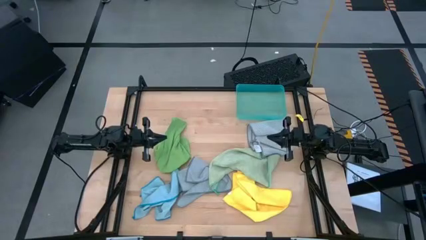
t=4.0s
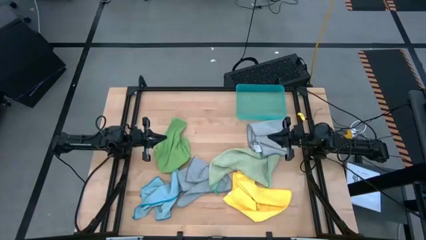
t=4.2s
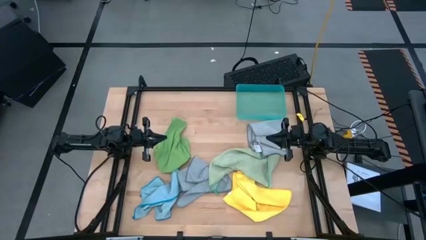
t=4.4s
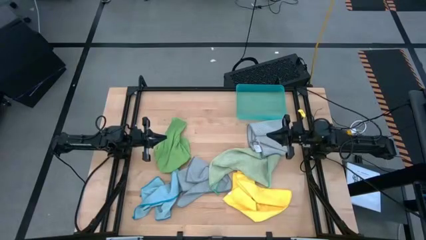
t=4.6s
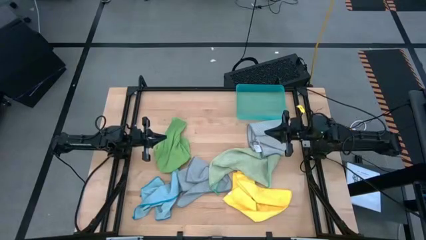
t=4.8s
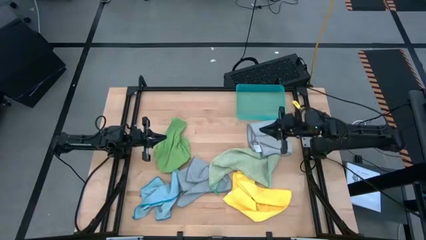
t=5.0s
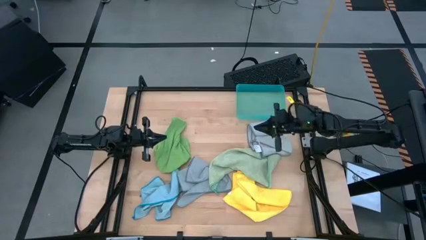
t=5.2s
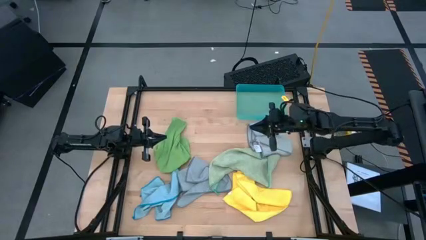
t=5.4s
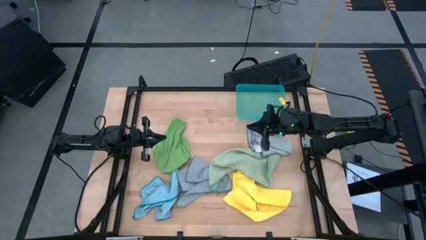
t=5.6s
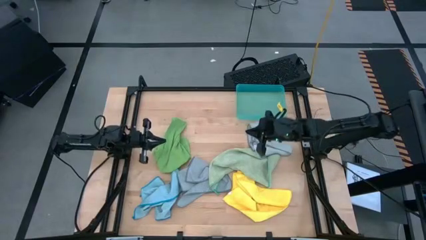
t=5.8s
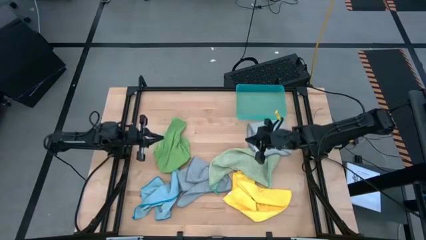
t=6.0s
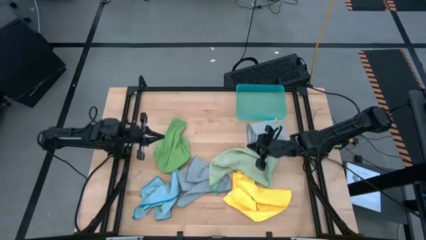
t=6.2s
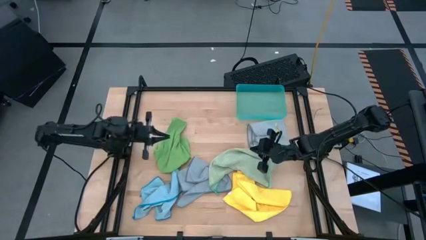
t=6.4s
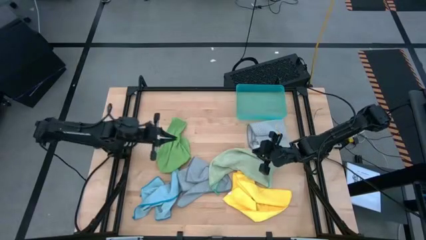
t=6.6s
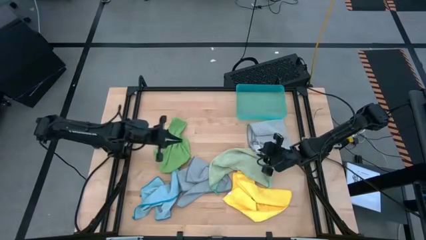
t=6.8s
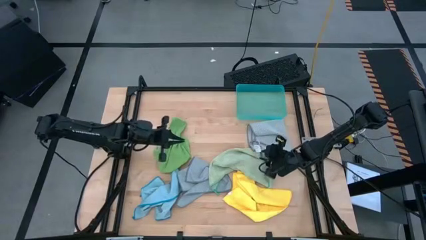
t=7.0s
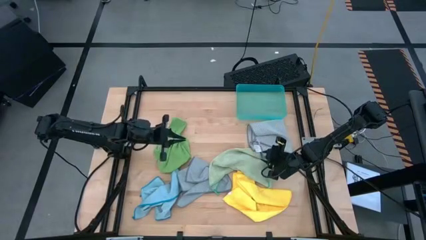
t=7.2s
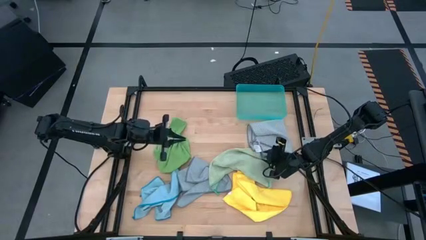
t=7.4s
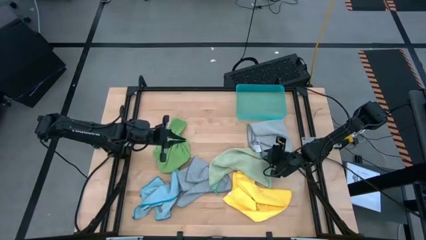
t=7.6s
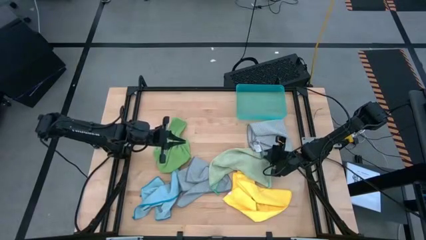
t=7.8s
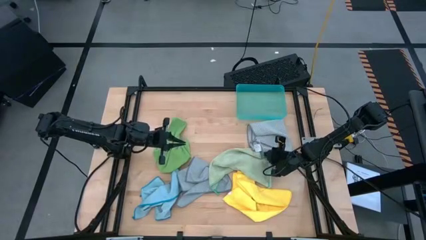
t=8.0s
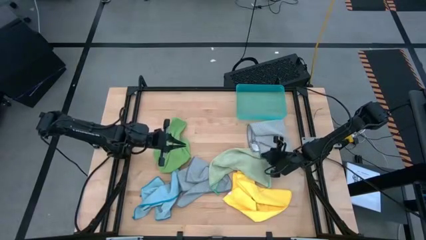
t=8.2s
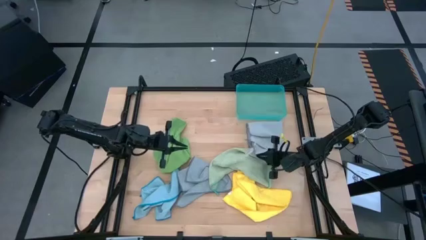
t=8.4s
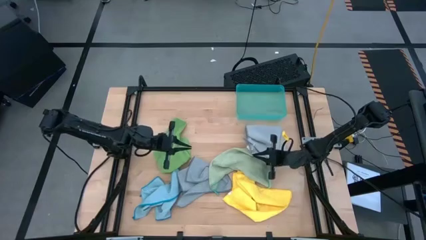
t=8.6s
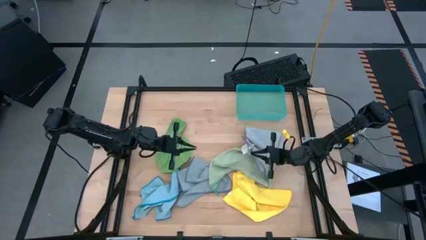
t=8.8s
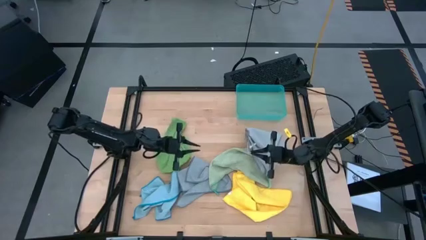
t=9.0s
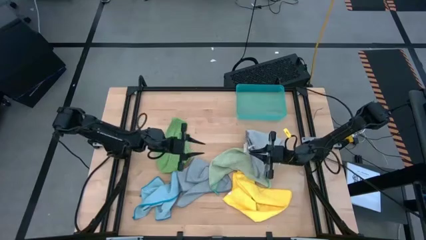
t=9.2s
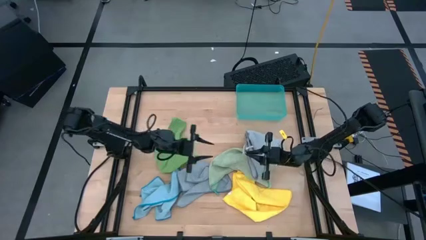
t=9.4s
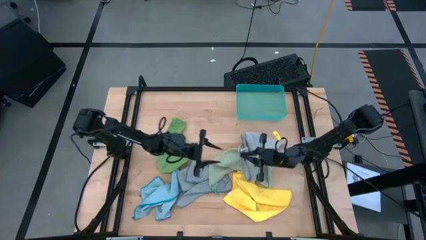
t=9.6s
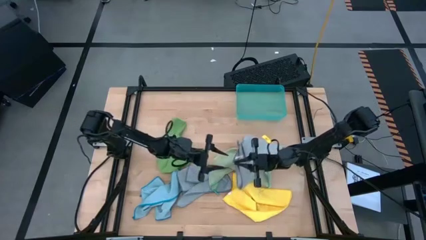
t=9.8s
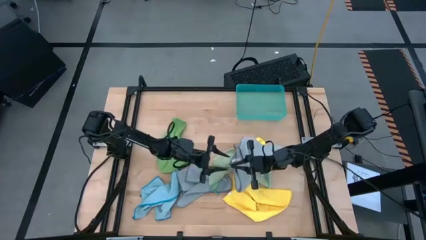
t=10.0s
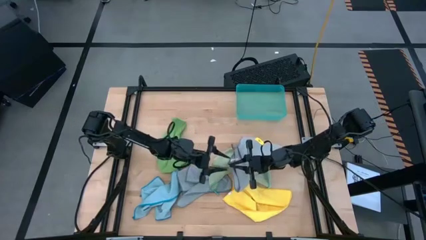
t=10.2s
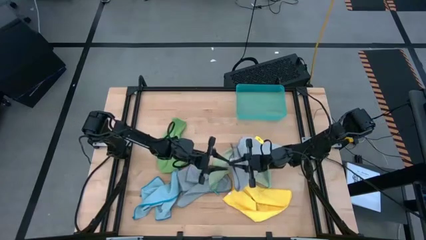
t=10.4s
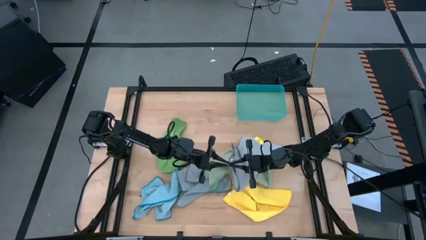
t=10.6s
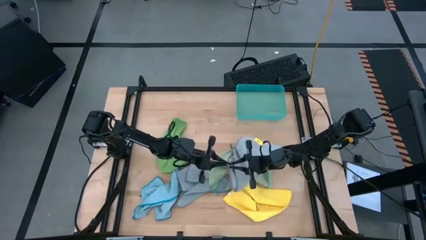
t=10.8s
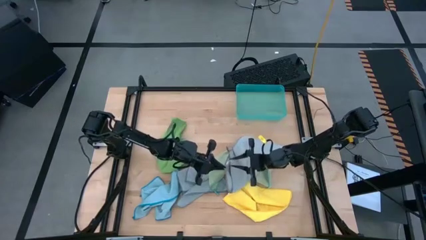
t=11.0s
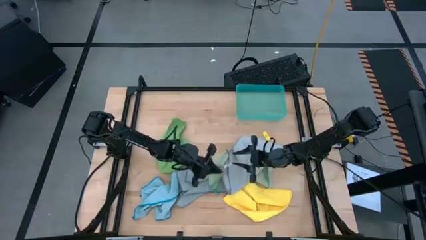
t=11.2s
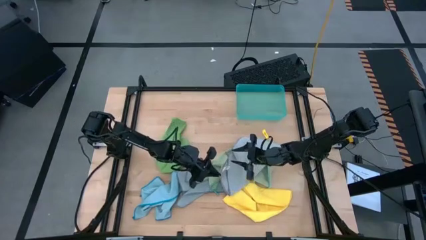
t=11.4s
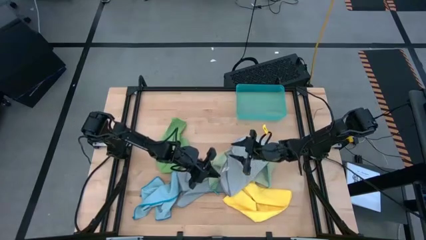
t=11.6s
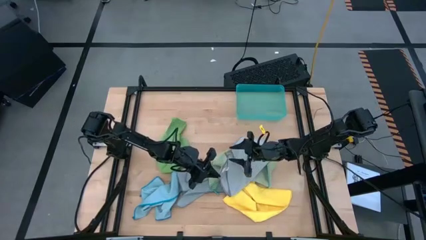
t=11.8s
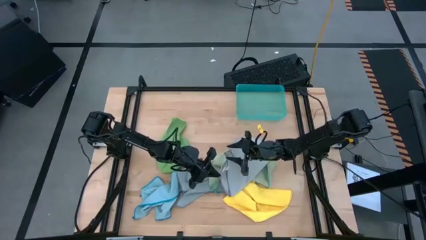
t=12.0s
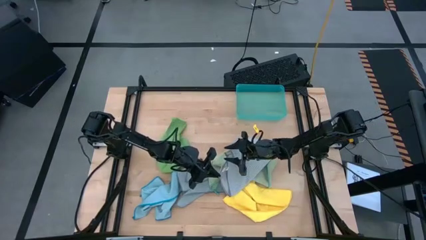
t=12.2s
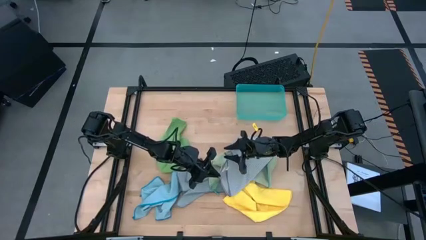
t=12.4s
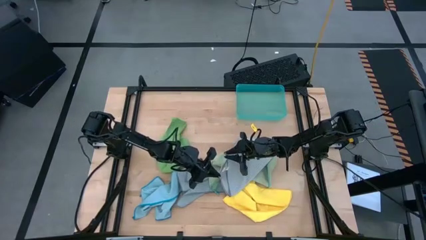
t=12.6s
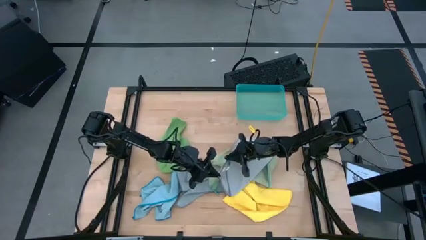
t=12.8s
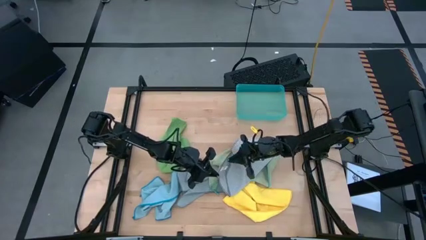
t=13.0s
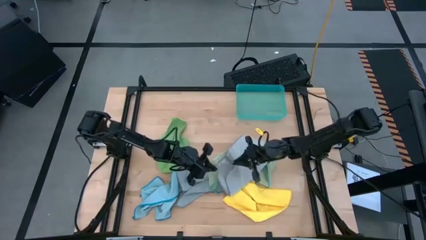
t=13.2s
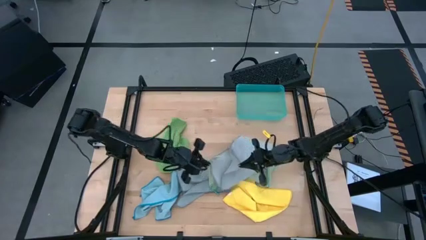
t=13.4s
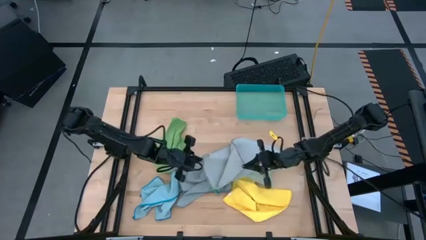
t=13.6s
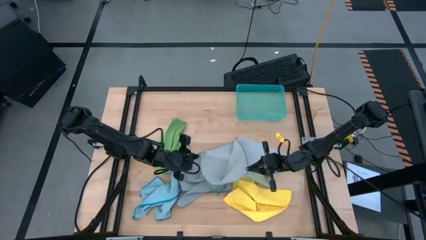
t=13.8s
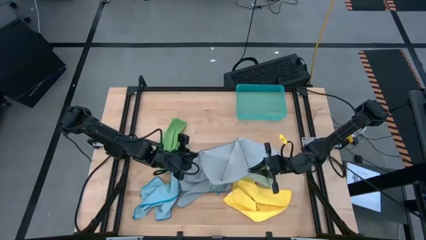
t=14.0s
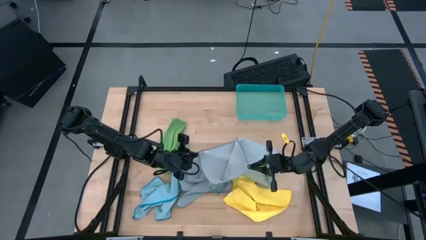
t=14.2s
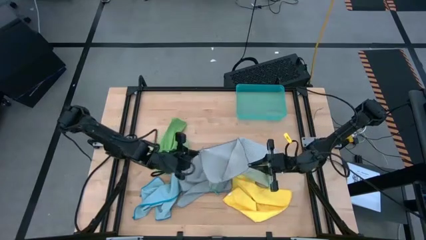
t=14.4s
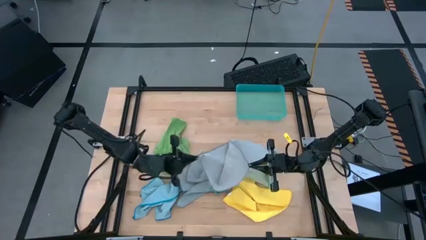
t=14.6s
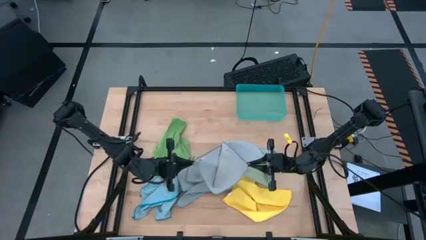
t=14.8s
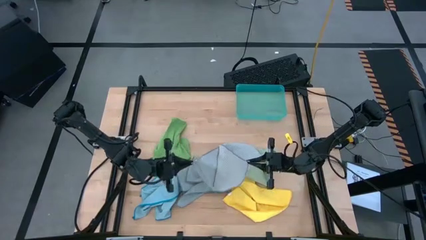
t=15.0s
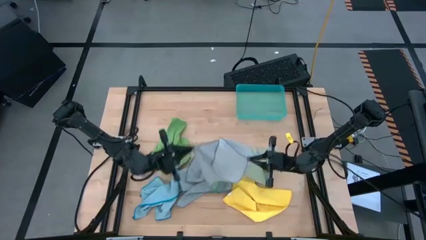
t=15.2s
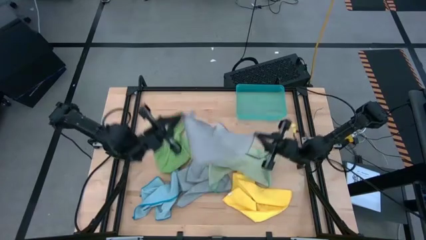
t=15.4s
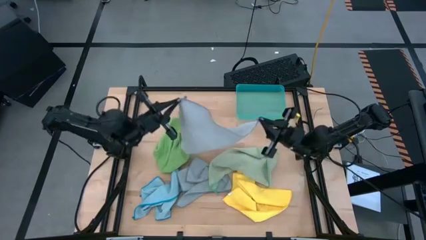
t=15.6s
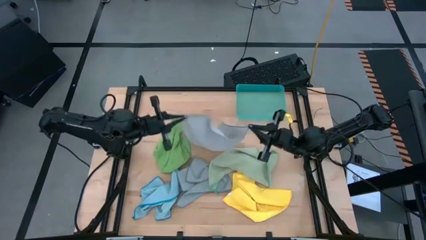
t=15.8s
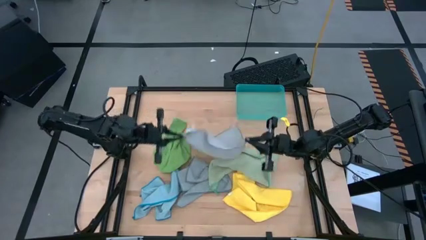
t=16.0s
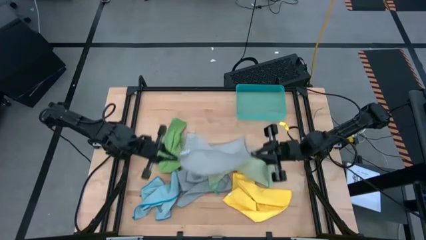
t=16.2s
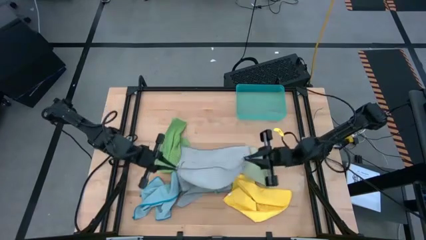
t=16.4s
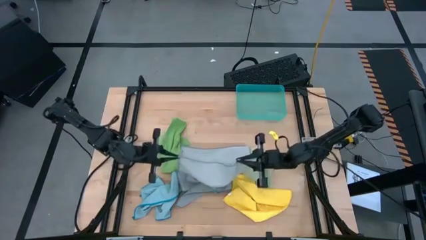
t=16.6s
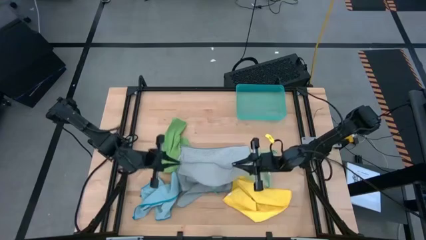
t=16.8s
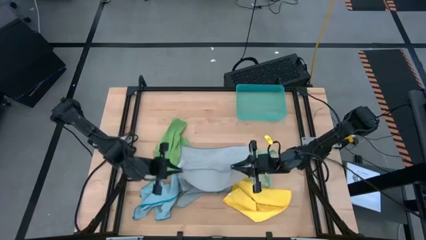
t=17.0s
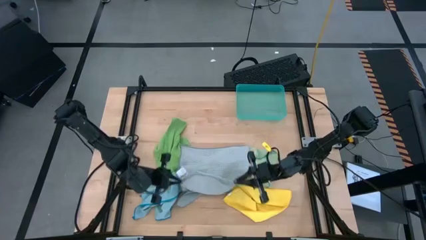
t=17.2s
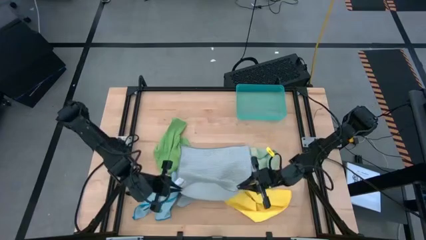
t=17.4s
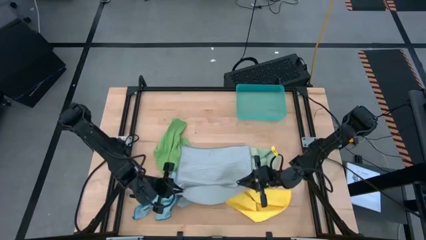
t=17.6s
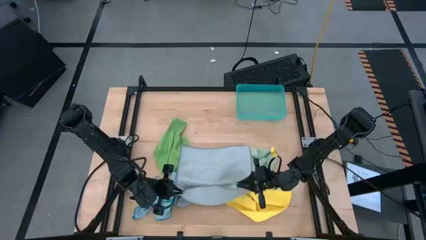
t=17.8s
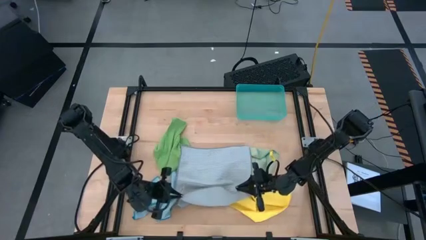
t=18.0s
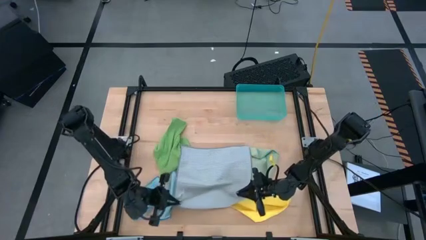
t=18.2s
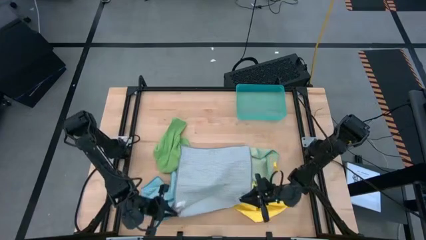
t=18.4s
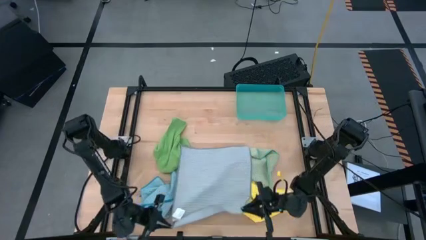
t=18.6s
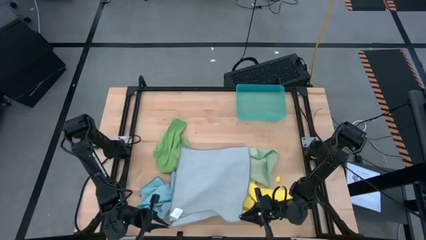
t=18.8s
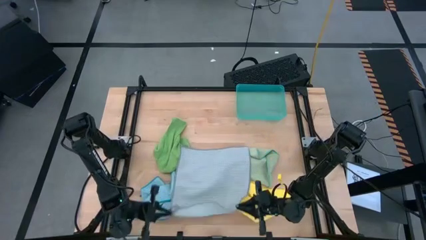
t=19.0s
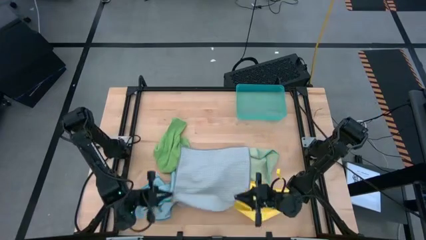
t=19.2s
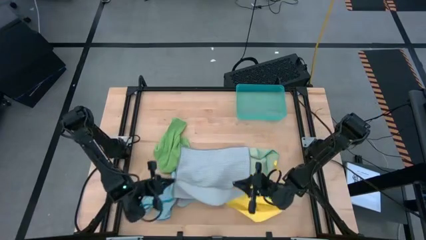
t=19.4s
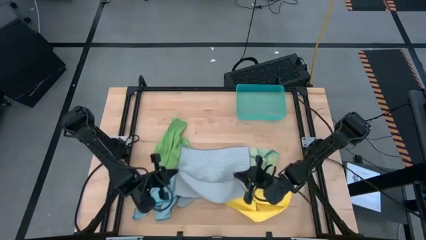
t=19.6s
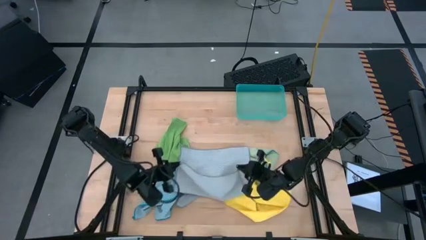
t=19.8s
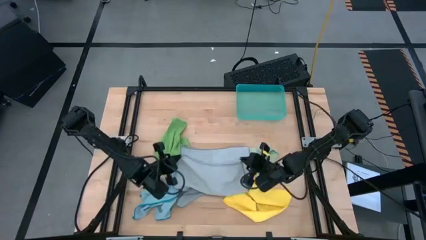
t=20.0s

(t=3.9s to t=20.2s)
Task: Fold microfiber towels
Fold the right gray microfiber cloth
